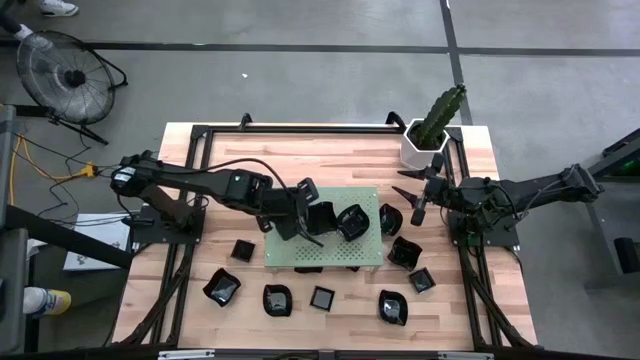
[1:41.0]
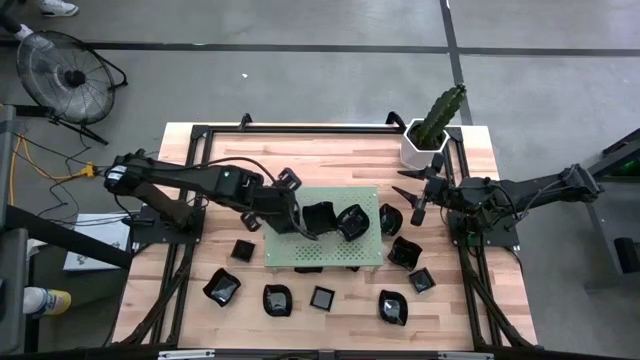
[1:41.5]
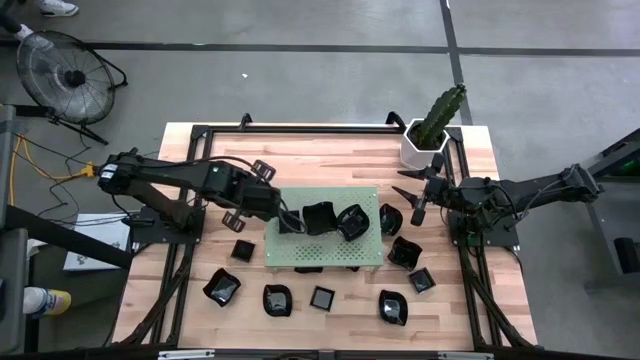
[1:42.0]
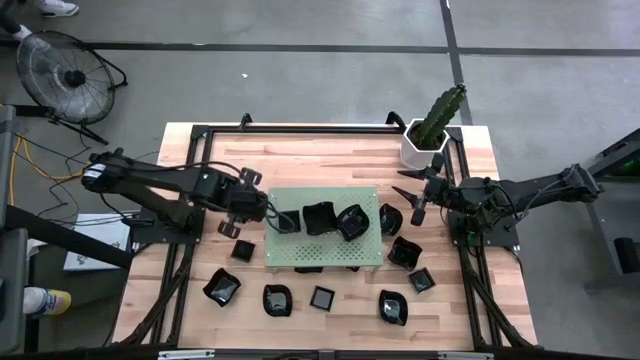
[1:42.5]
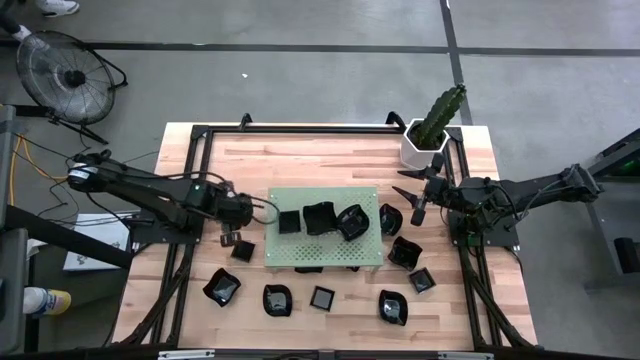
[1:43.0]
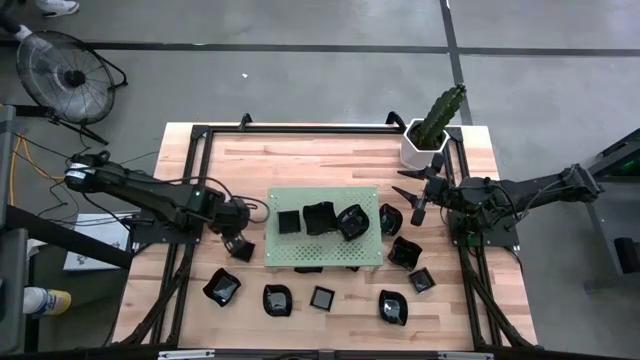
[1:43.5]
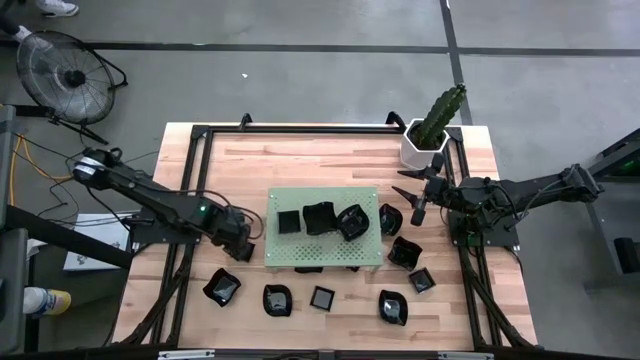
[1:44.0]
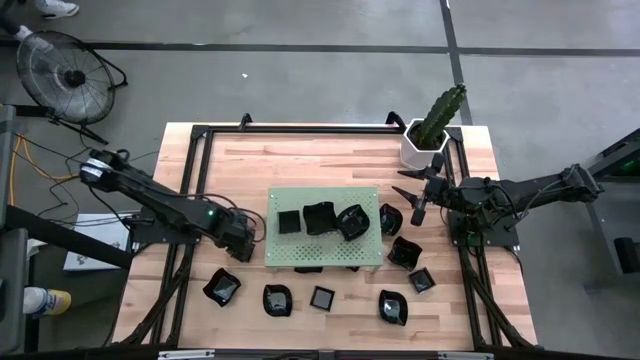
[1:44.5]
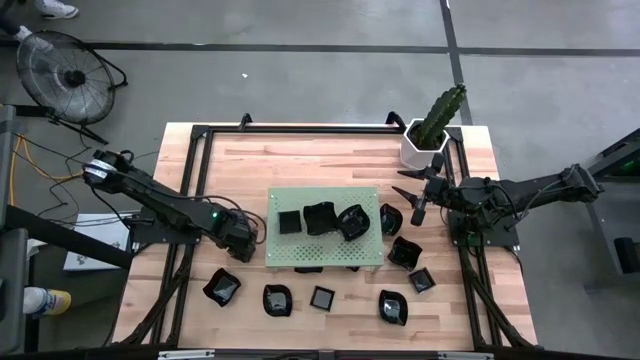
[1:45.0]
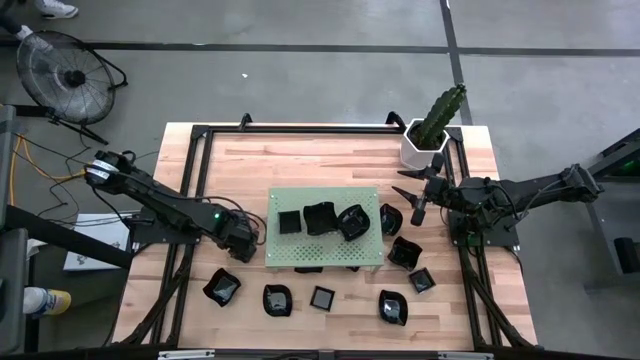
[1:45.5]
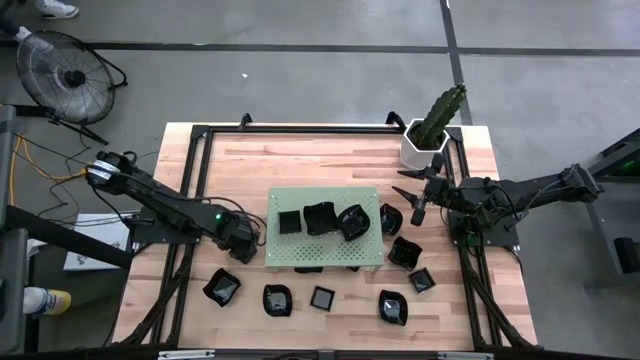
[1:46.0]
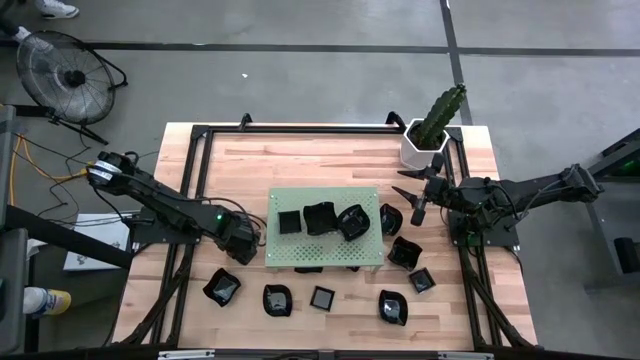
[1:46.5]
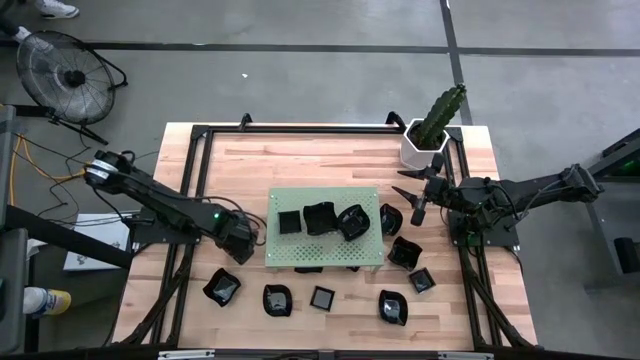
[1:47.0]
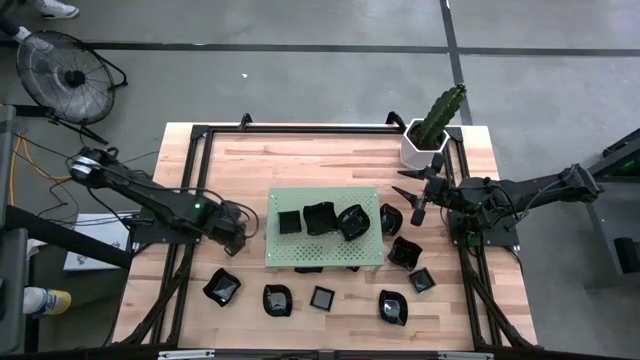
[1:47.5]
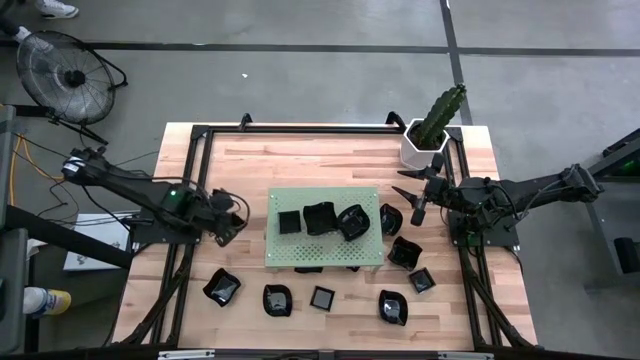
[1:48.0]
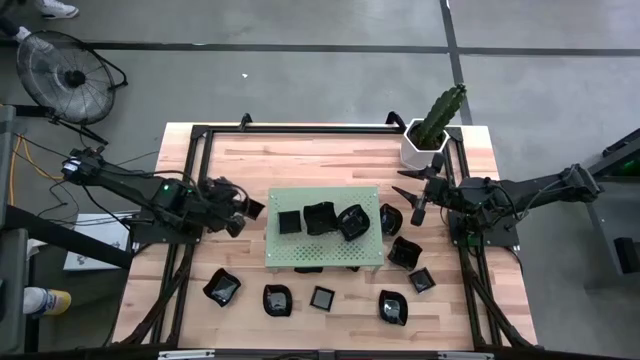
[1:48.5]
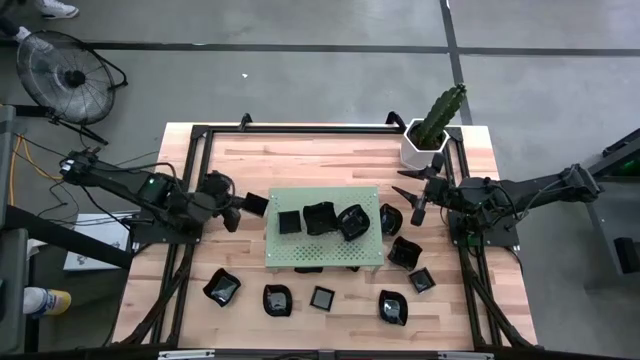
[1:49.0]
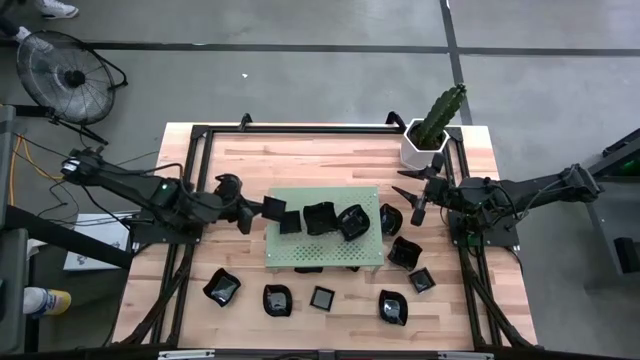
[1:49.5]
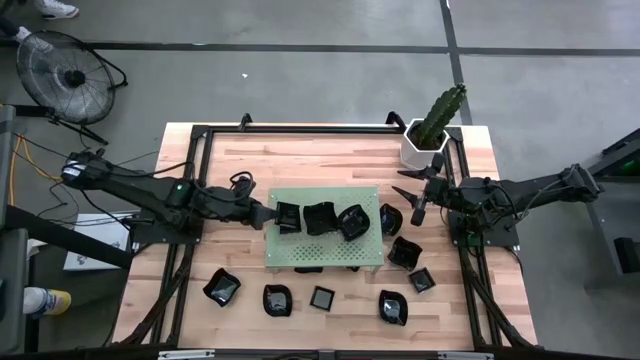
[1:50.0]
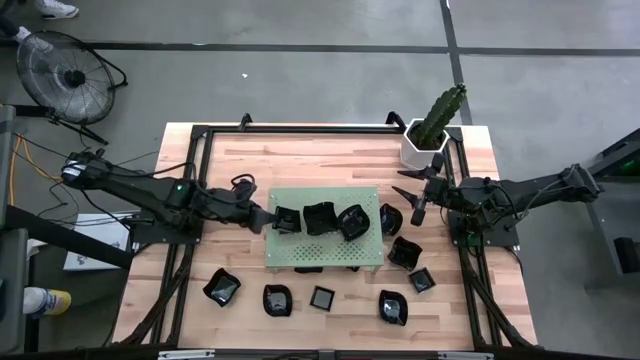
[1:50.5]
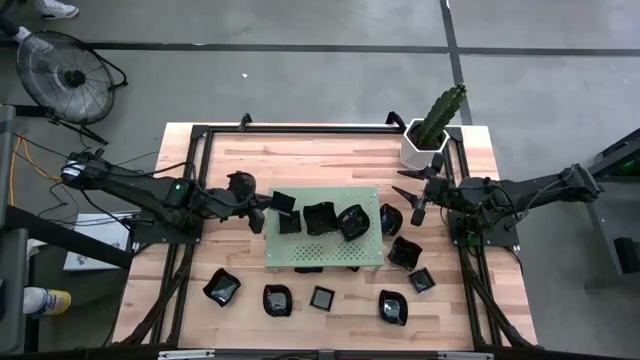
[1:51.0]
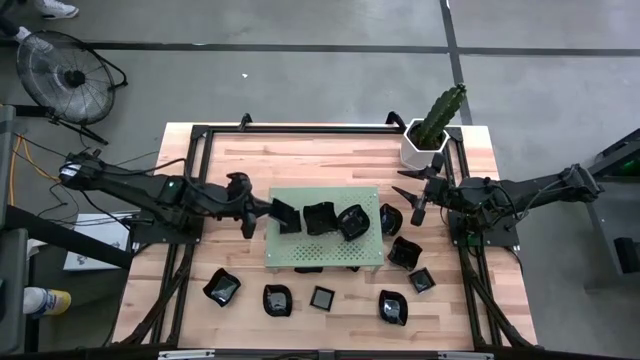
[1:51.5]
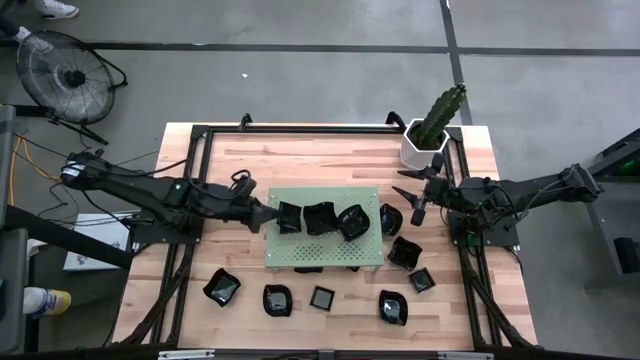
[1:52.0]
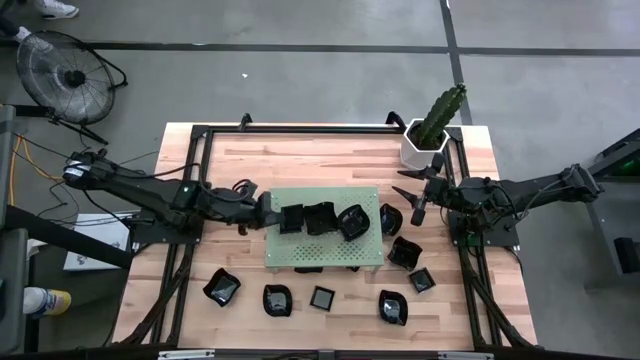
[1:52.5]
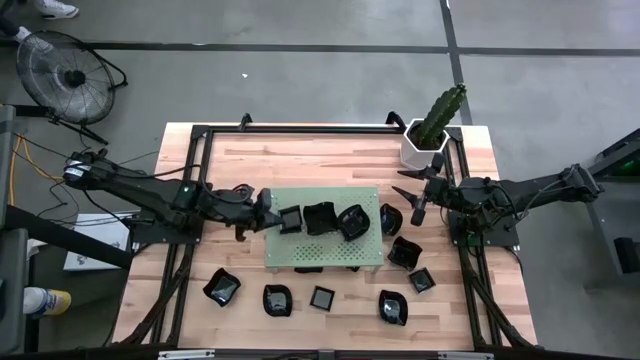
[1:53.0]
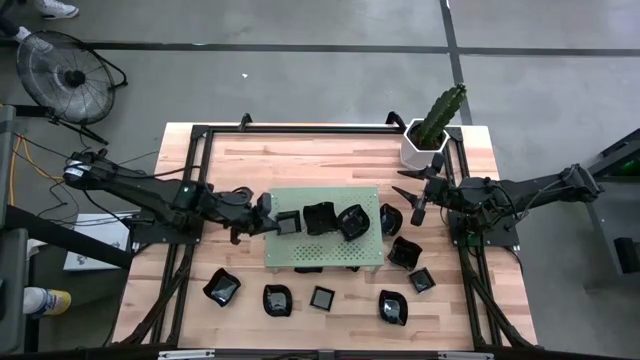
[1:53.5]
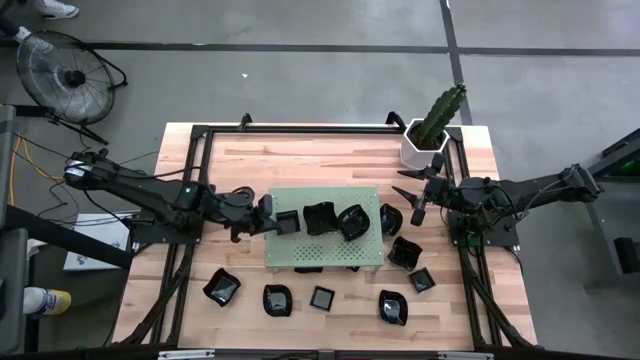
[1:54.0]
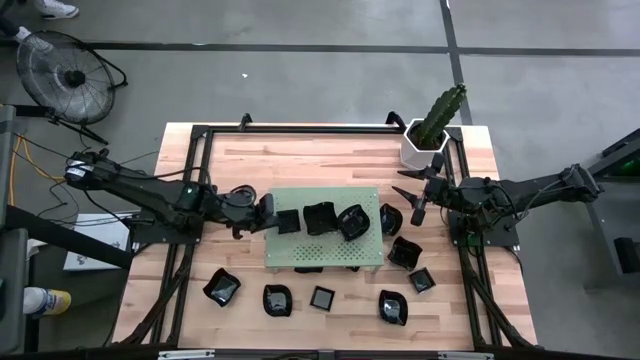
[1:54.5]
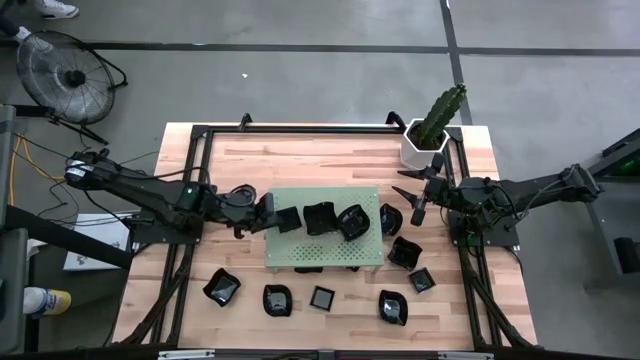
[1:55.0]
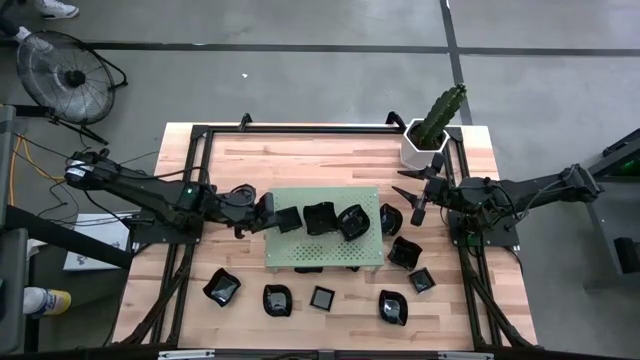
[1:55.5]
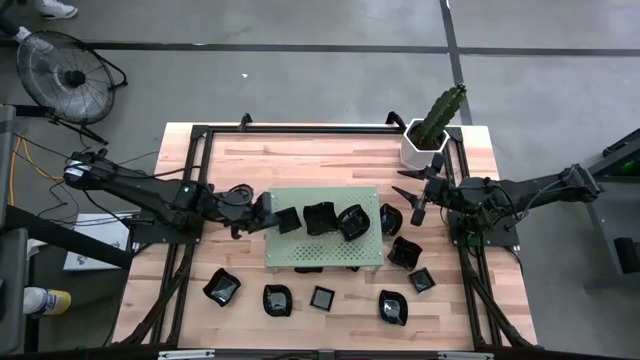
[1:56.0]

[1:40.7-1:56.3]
Task: Pick & Place Mini shaped plates
Stack the black square shaped plate on top of the black square shaped plate on the shelf

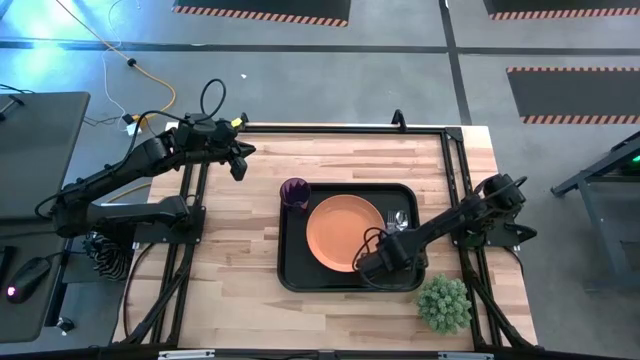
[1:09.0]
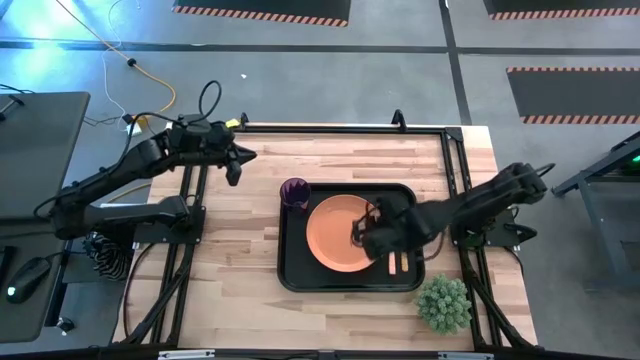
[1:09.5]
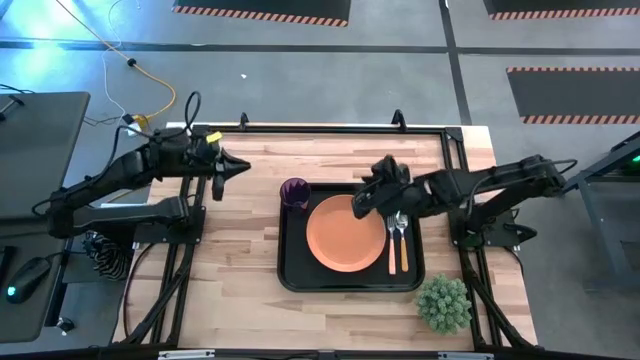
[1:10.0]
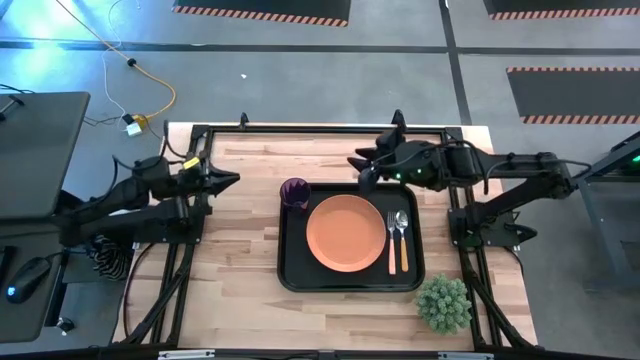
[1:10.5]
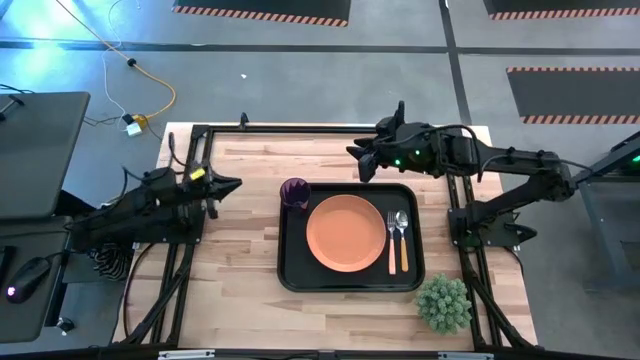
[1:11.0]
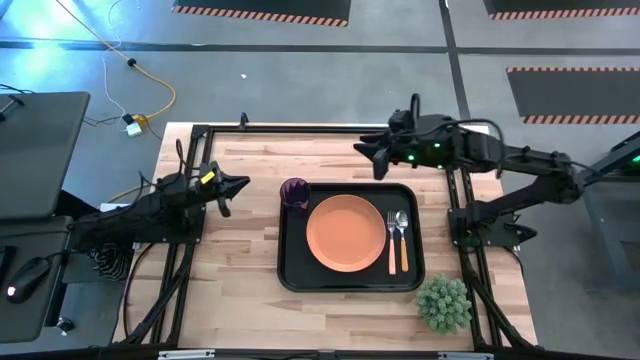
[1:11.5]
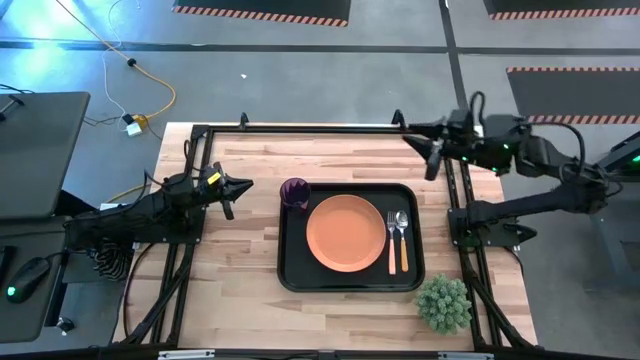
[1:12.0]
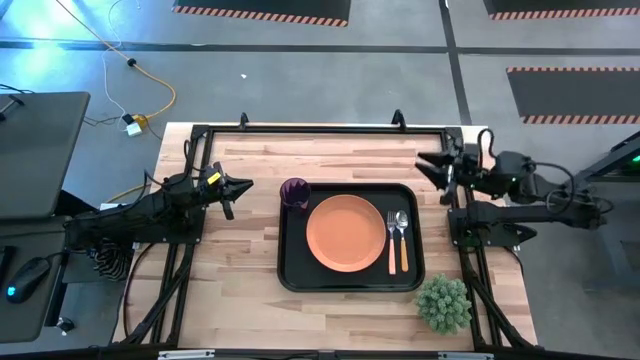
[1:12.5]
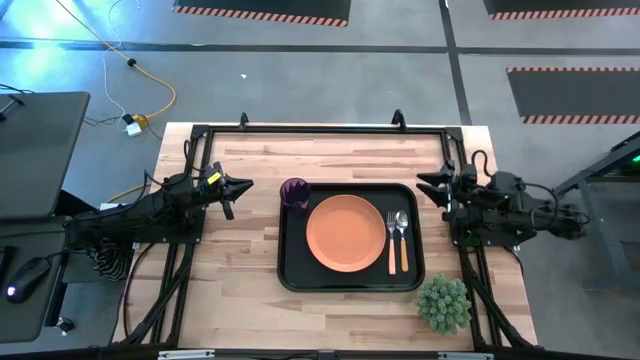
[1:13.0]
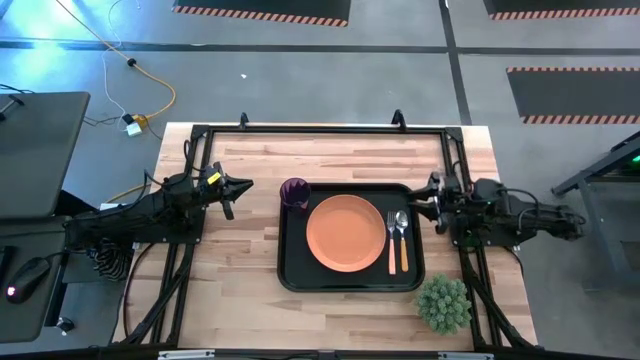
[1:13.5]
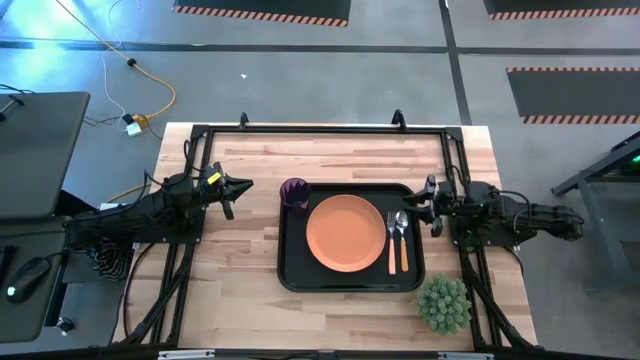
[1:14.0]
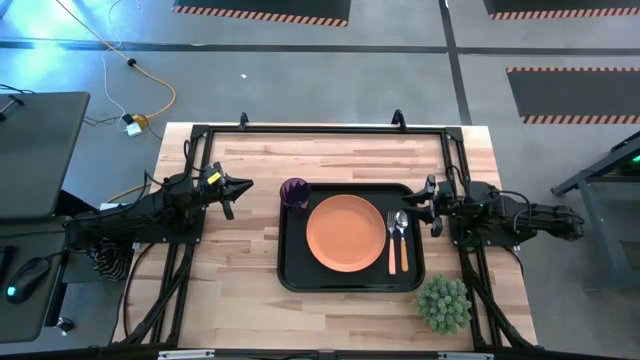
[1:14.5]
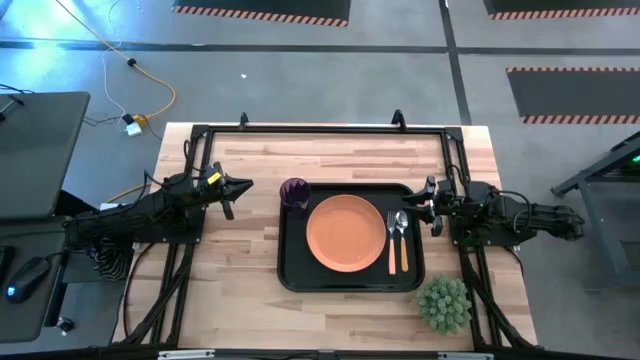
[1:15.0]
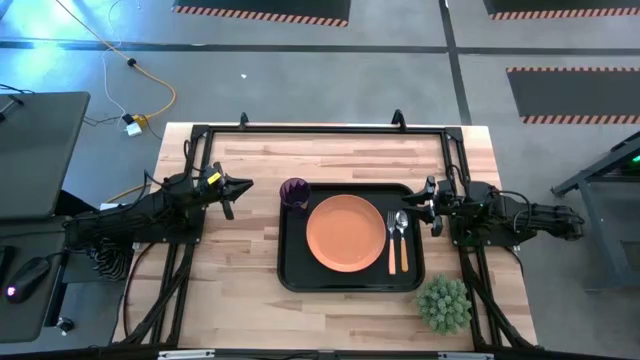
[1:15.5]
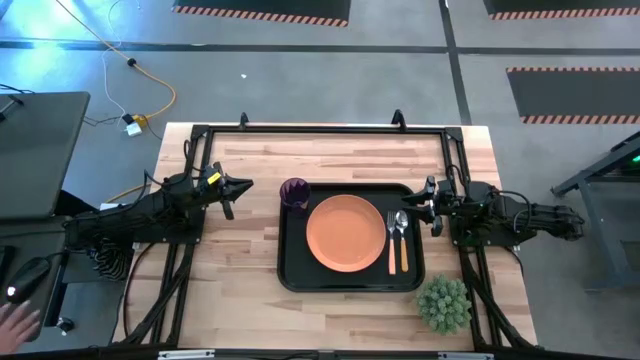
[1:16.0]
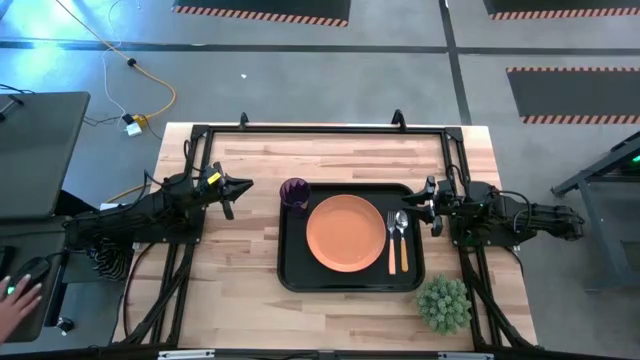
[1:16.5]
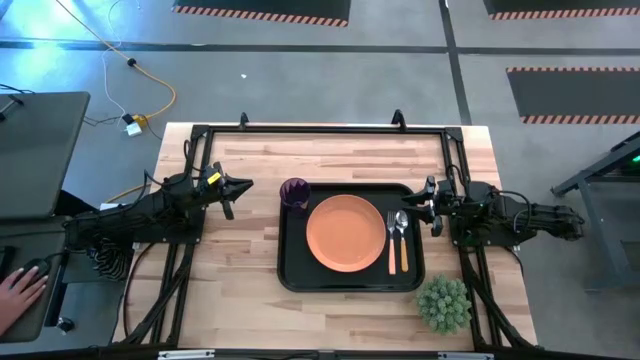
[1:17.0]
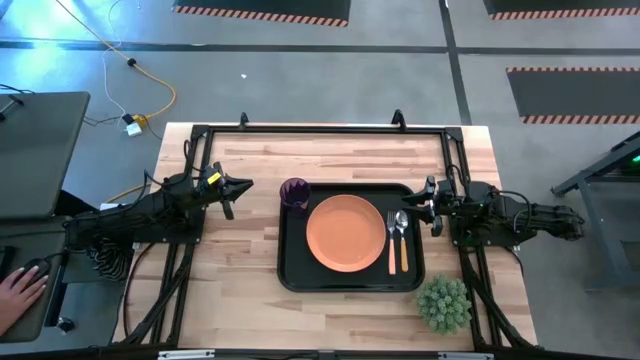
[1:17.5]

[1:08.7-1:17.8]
Task: Pick and place plate/cup/fork/spoon on tray
Return to Home Position
